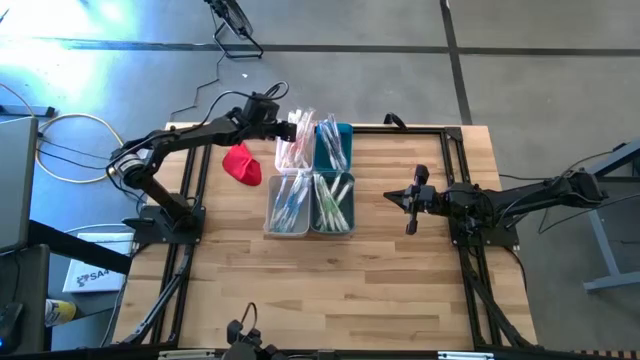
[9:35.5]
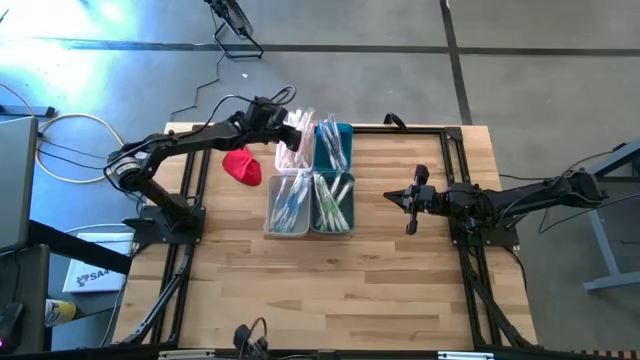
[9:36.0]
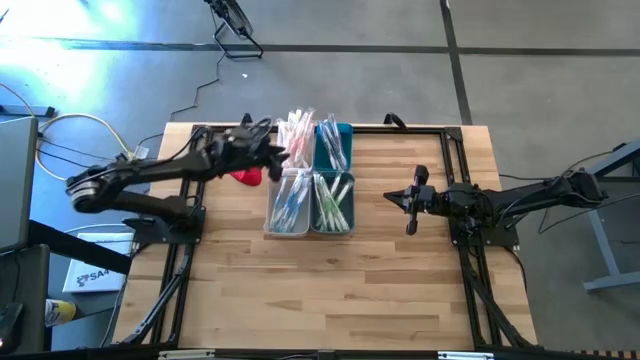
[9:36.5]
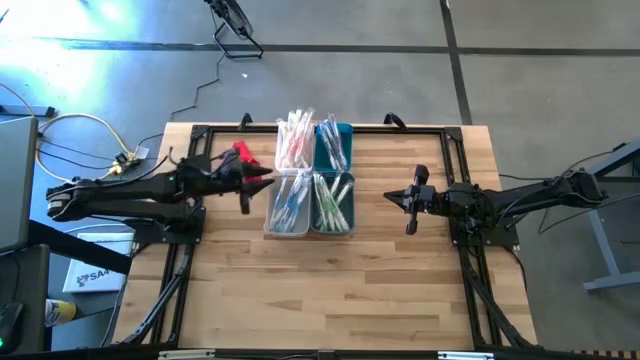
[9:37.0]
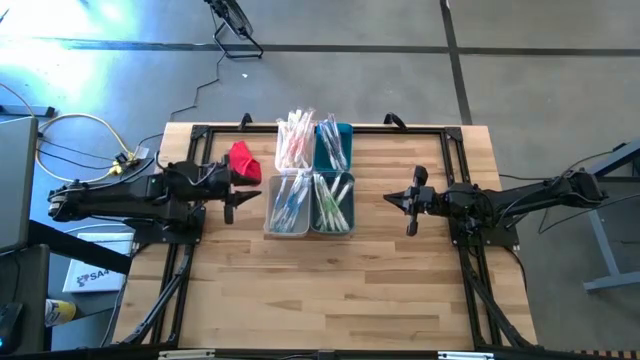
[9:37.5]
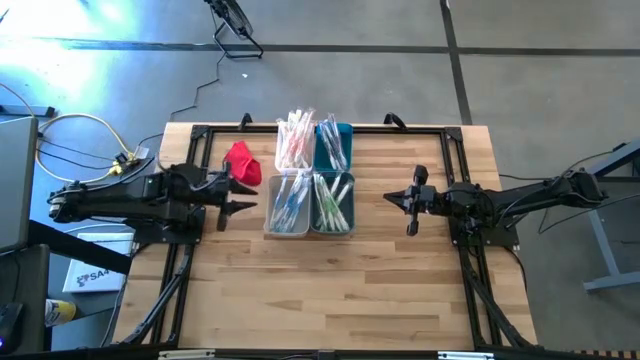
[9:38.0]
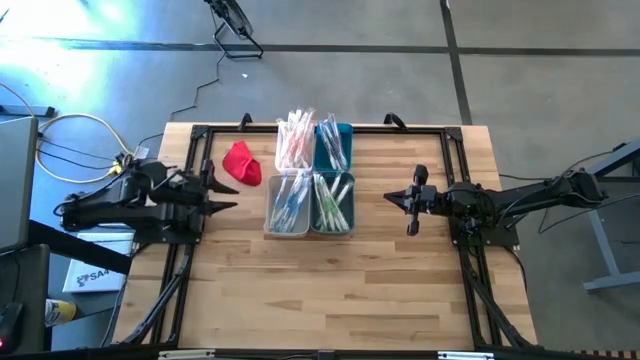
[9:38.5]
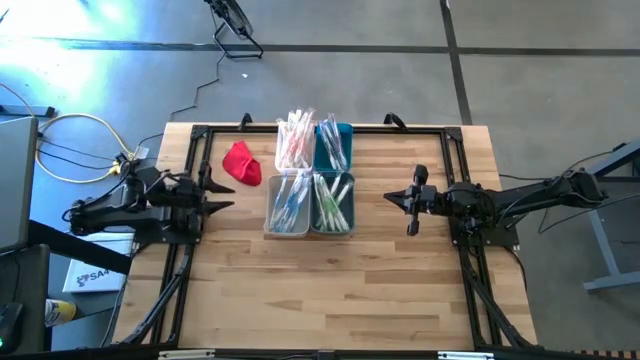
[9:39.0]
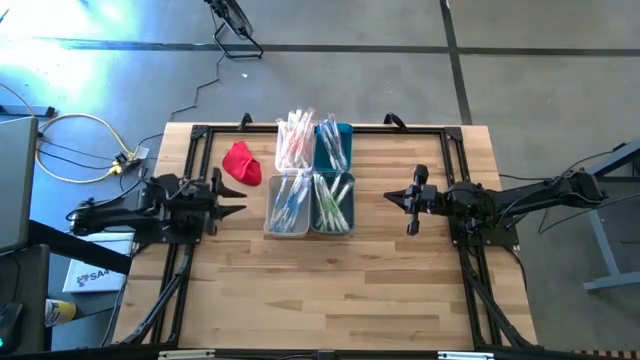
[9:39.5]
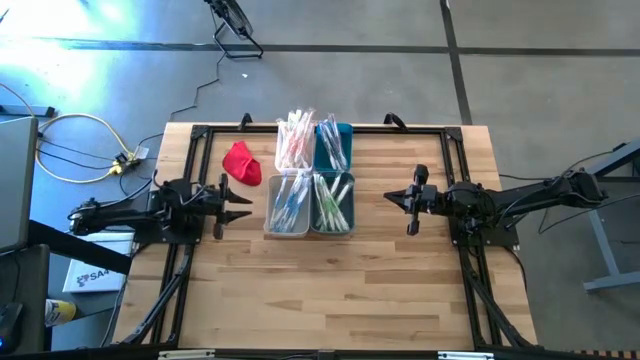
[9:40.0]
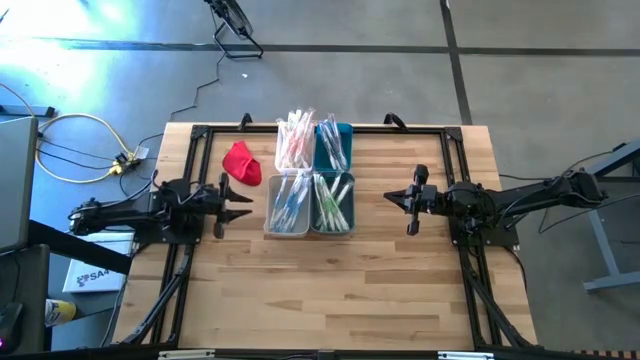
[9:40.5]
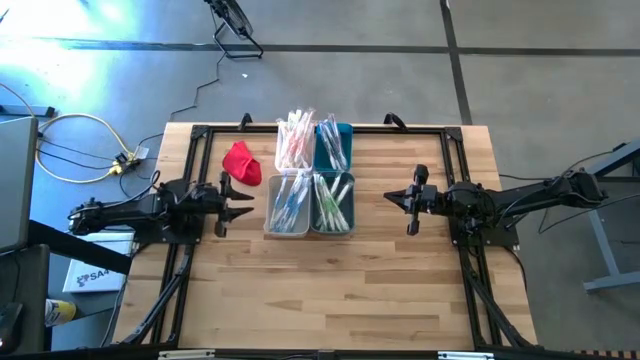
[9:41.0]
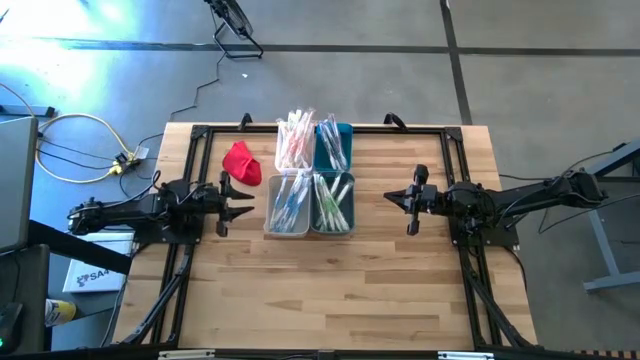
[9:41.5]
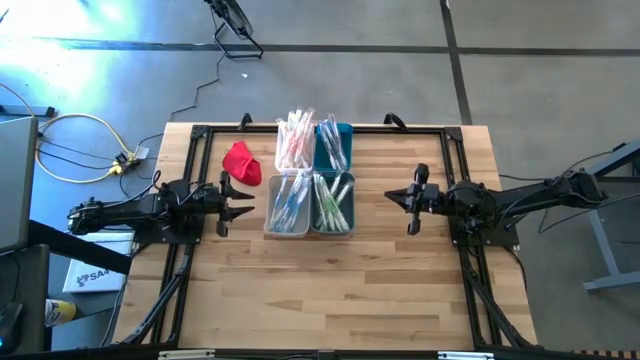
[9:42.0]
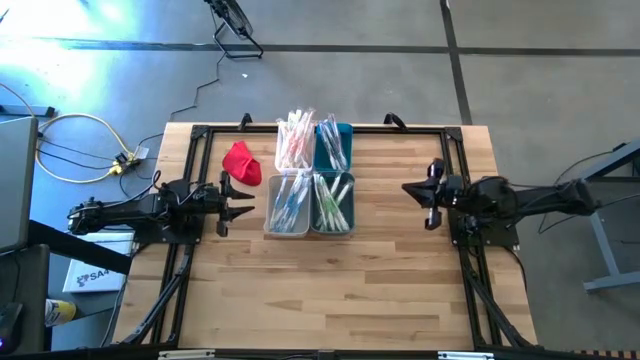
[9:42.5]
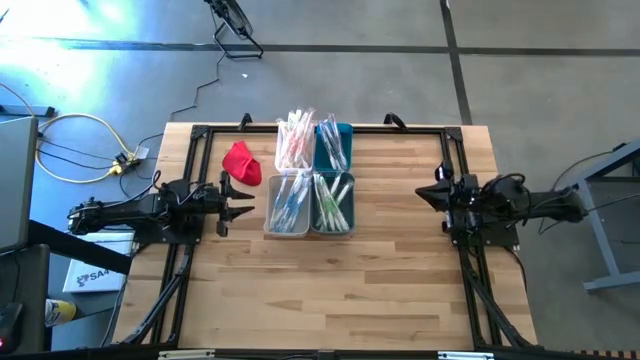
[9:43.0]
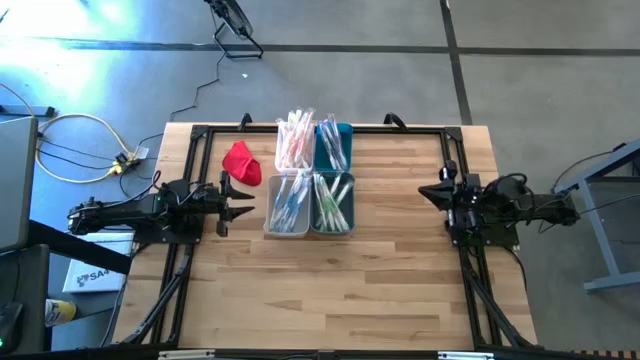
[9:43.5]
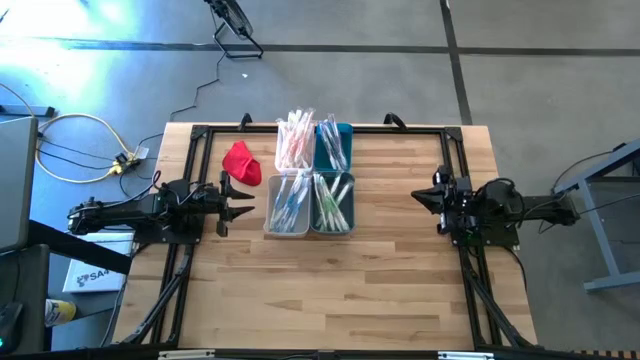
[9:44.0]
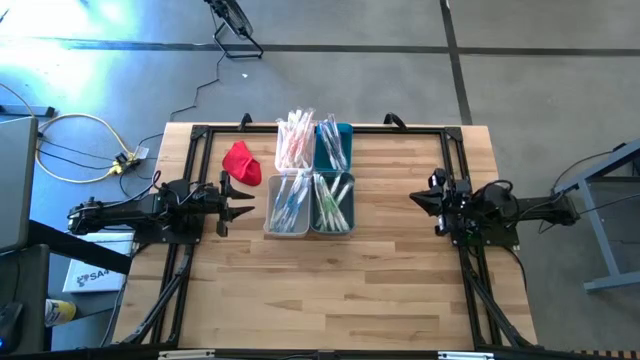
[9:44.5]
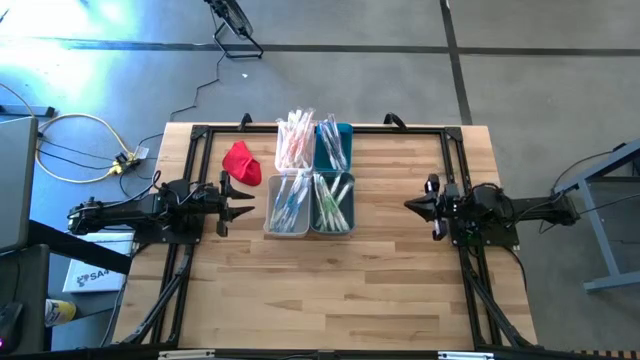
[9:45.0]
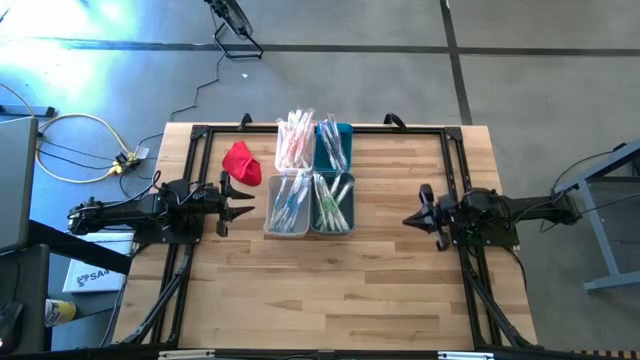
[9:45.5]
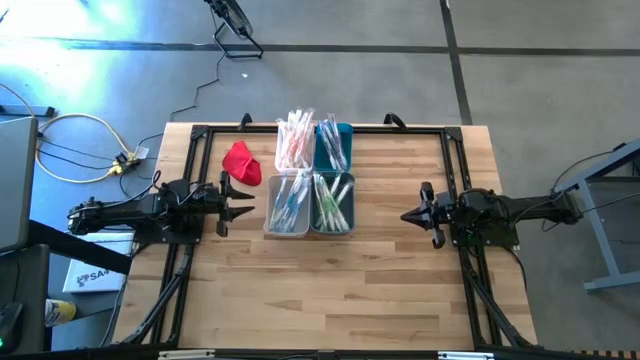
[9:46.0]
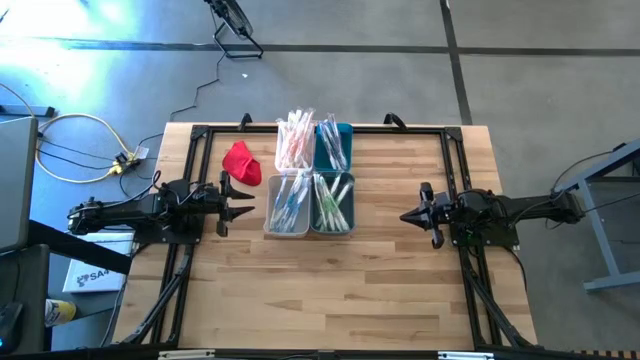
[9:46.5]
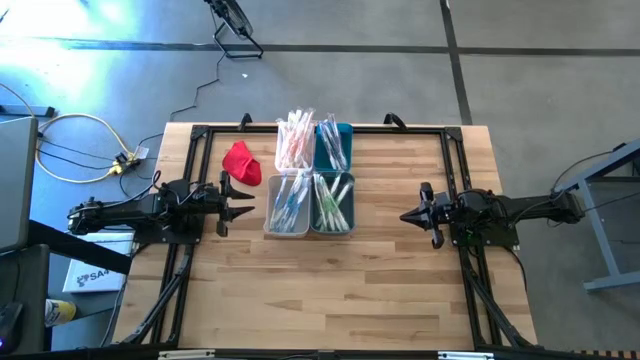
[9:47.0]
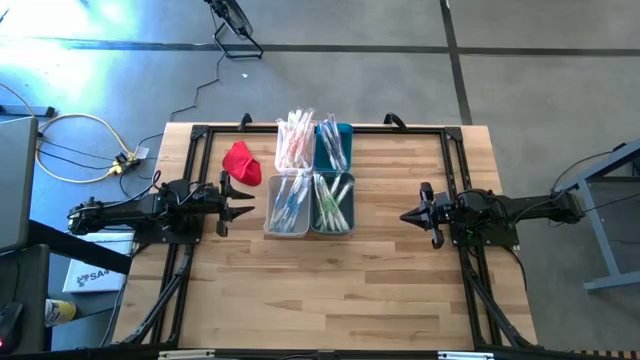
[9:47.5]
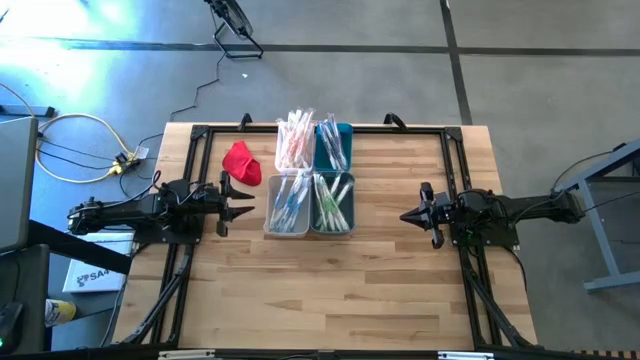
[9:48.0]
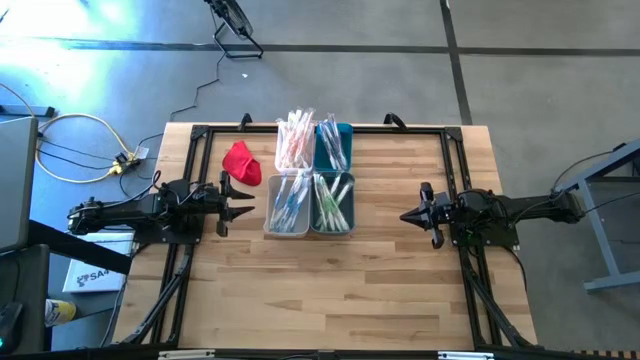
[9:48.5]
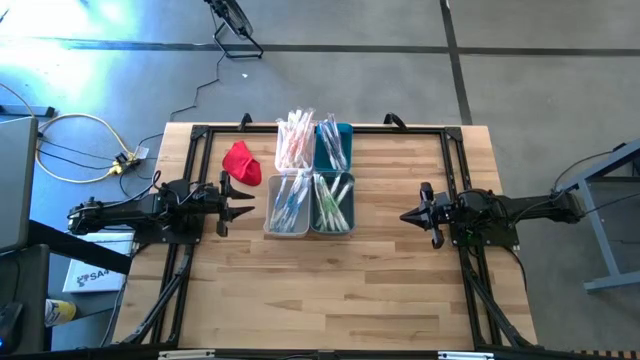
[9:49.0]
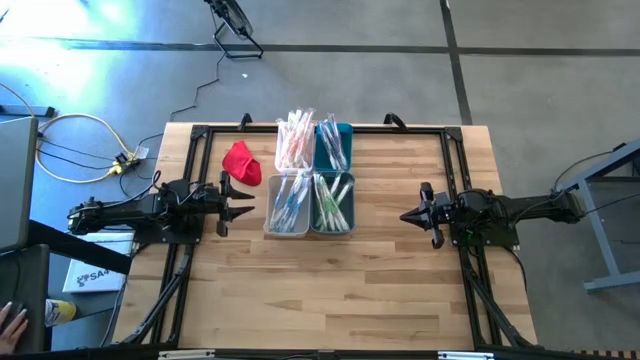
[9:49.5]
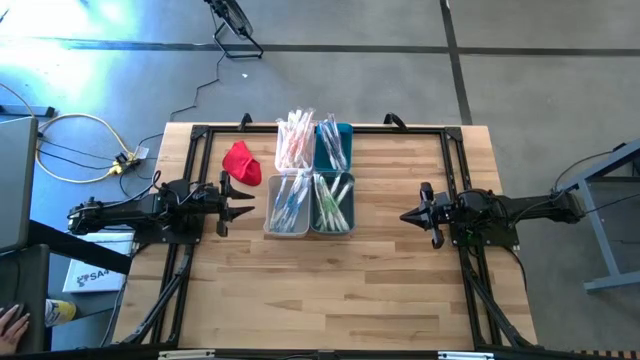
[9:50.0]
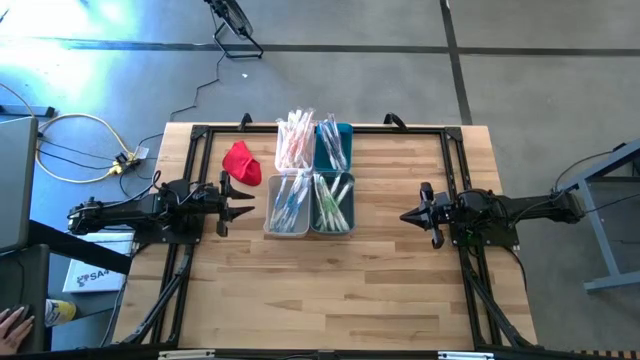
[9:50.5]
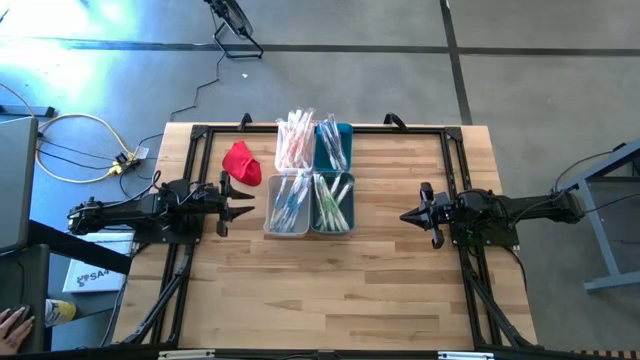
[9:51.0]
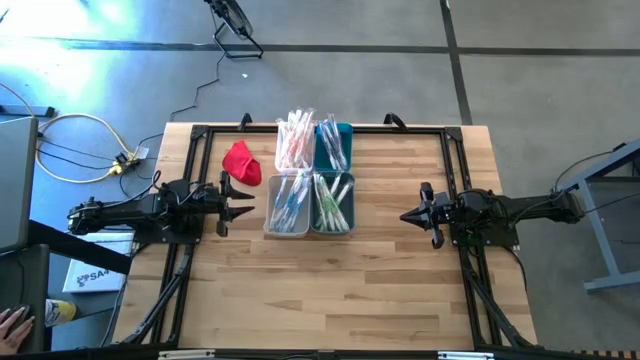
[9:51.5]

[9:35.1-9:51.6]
Task: Pick & Place Toothbrushes
Return to Home Position
